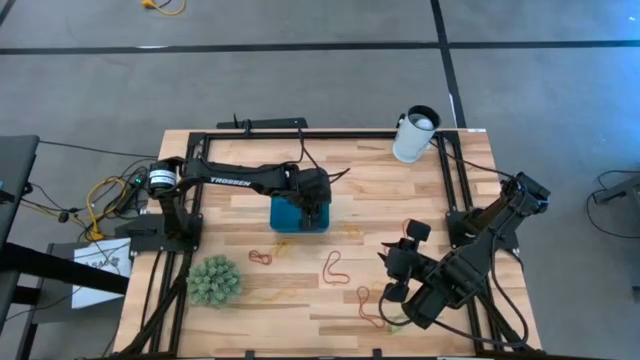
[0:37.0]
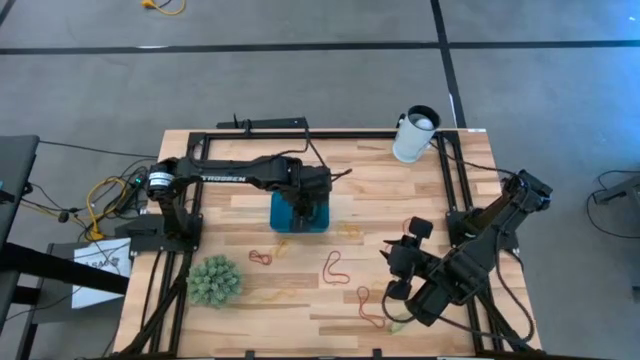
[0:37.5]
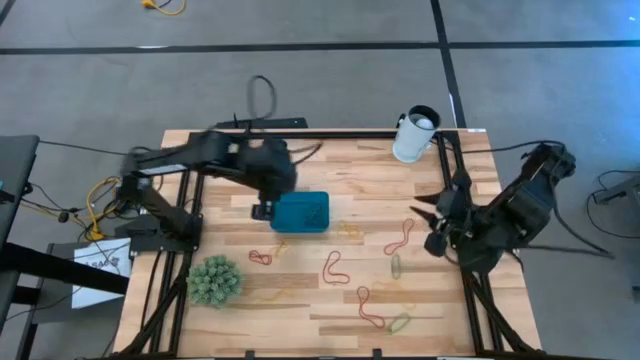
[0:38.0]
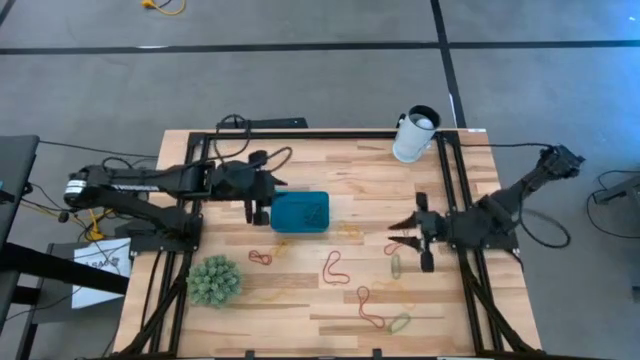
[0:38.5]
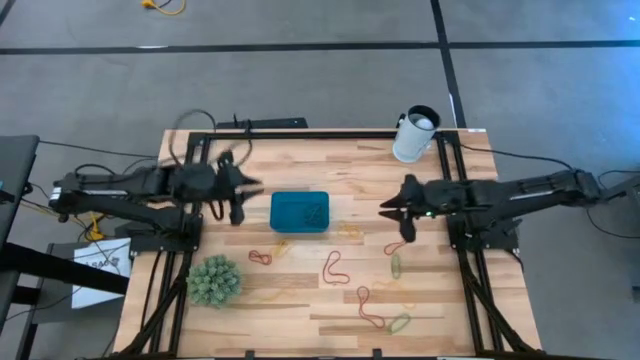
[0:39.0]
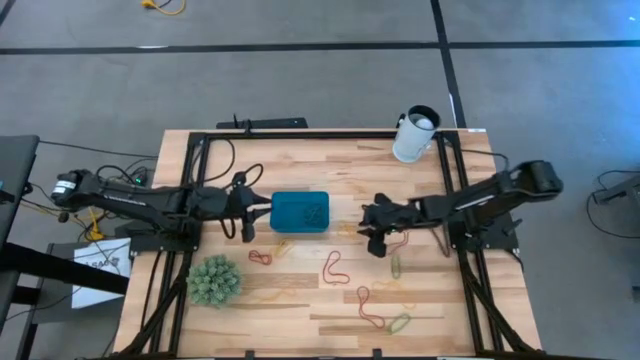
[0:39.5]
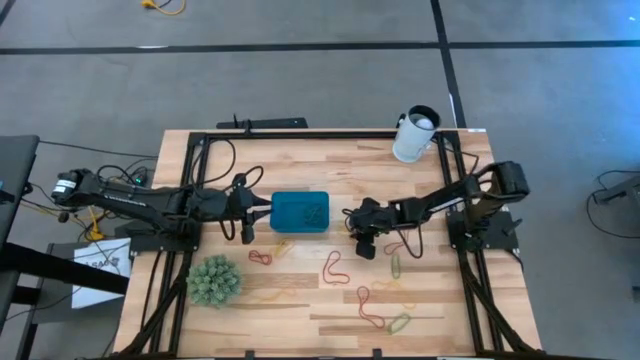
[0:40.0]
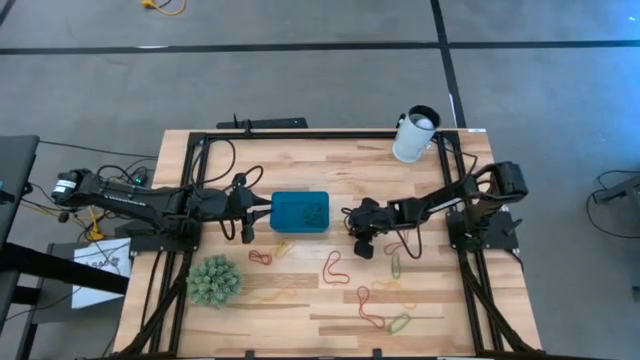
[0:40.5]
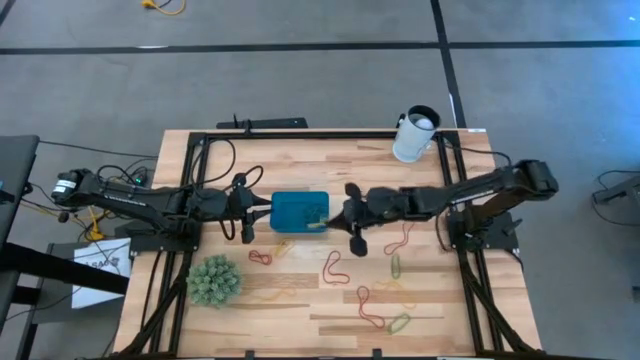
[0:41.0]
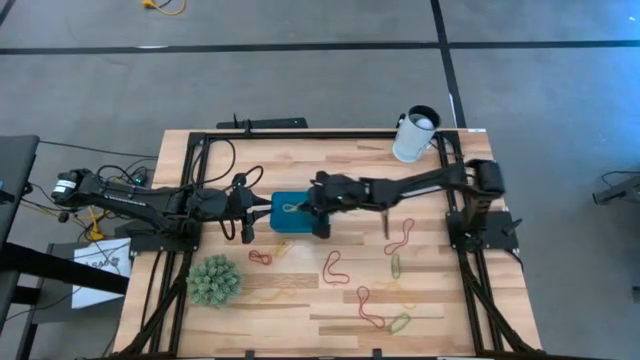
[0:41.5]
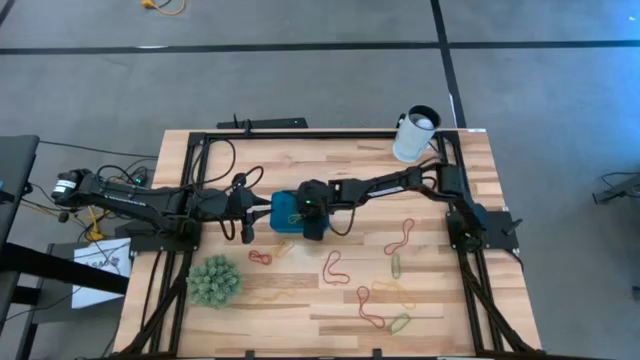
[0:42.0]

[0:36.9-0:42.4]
Task: Pick and place items into bin
Put the yellow rubber band into the blue bin

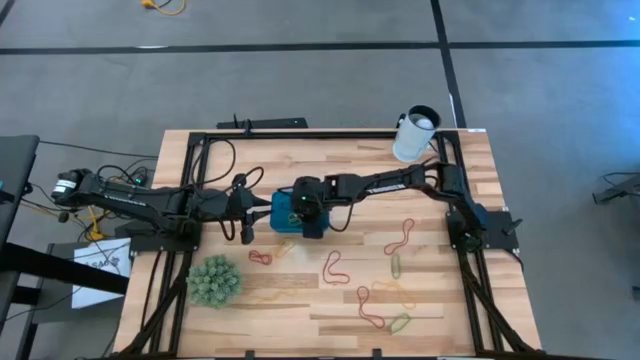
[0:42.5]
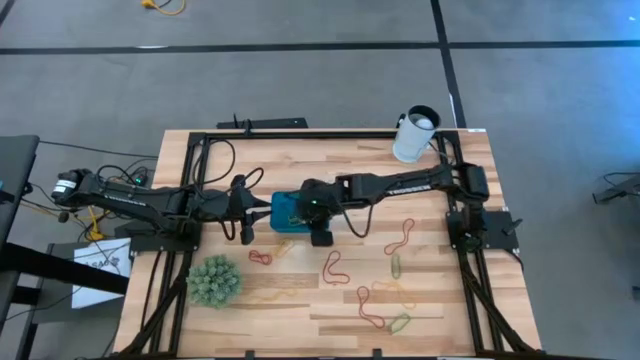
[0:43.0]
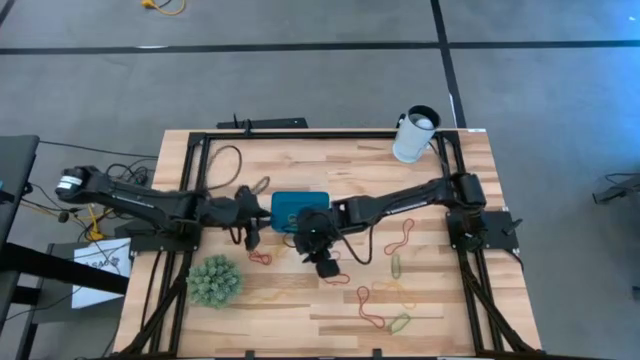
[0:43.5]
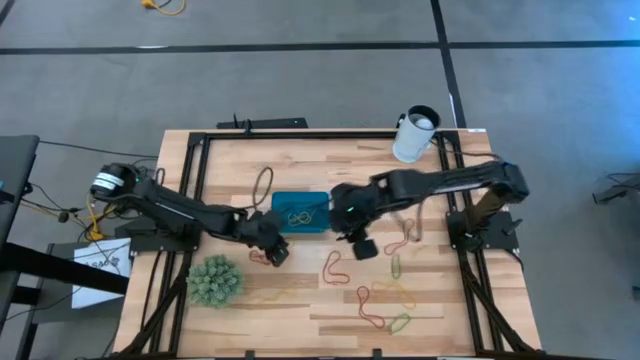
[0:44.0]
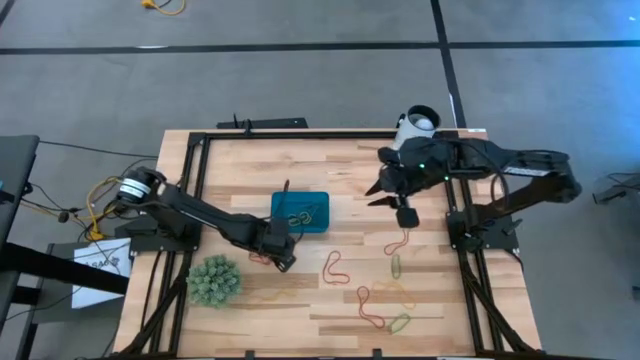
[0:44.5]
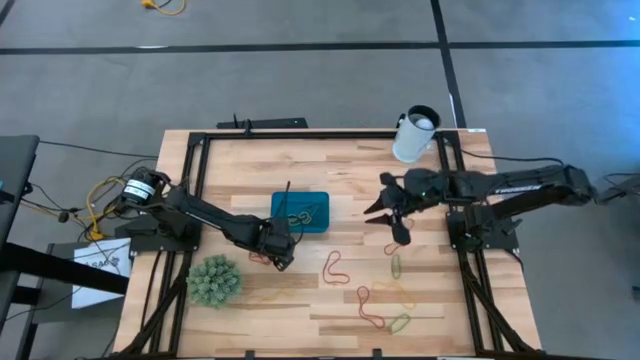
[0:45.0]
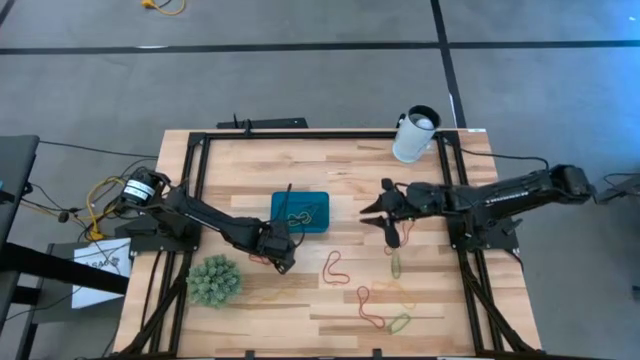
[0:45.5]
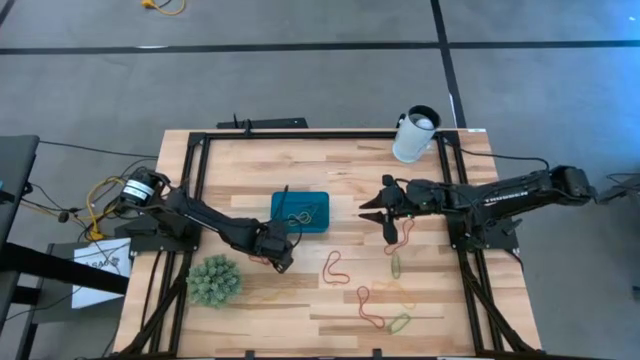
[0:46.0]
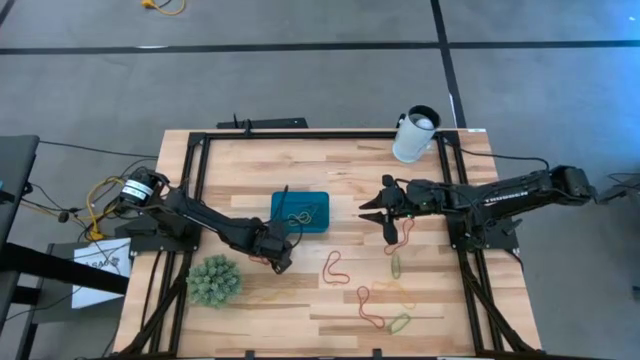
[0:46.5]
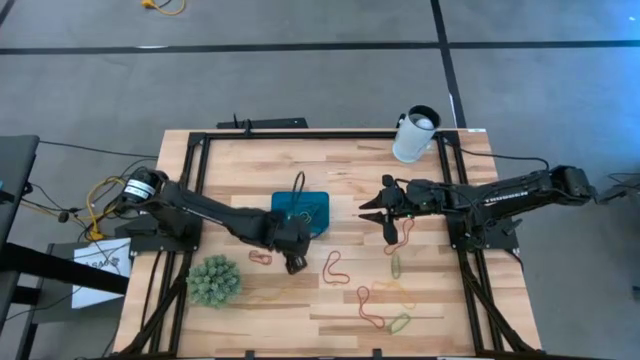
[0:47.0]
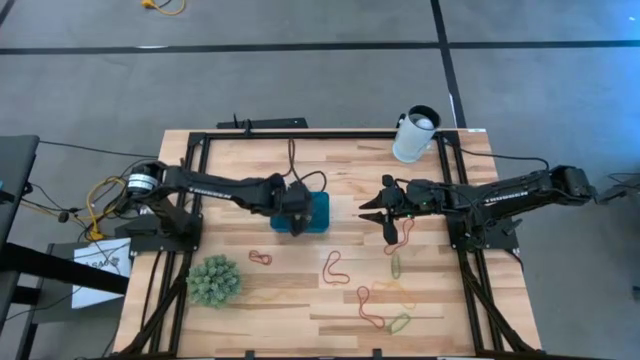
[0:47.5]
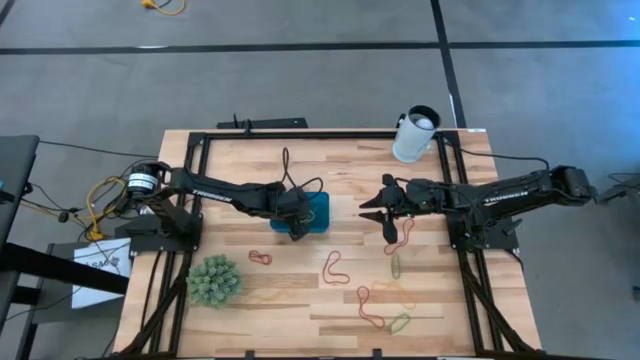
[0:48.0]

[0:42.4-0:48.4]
Put the yellow rubber band into the blue bin

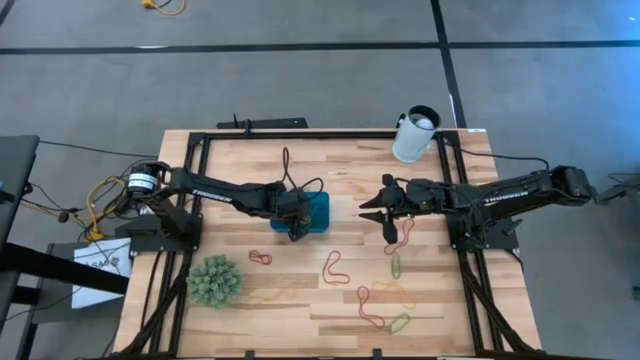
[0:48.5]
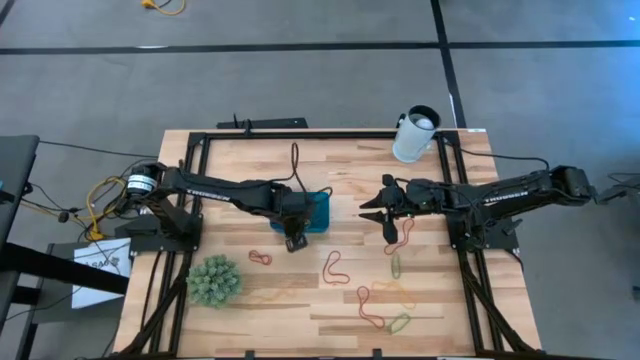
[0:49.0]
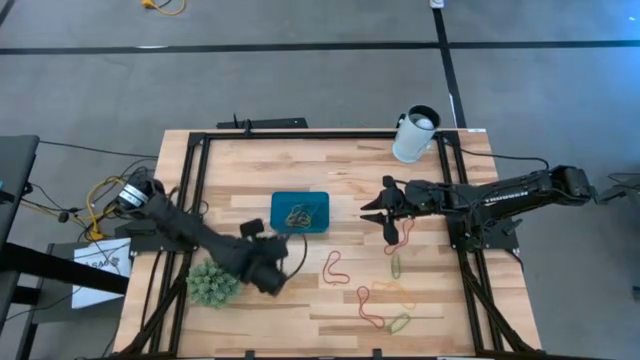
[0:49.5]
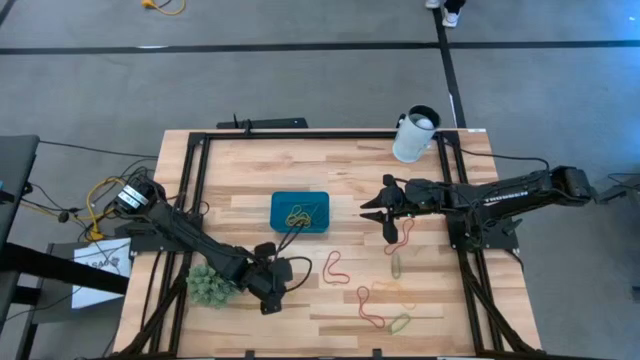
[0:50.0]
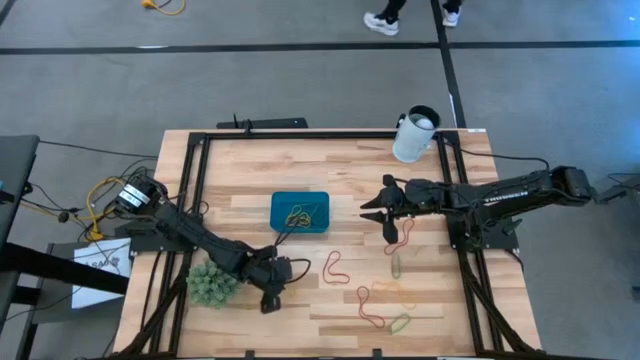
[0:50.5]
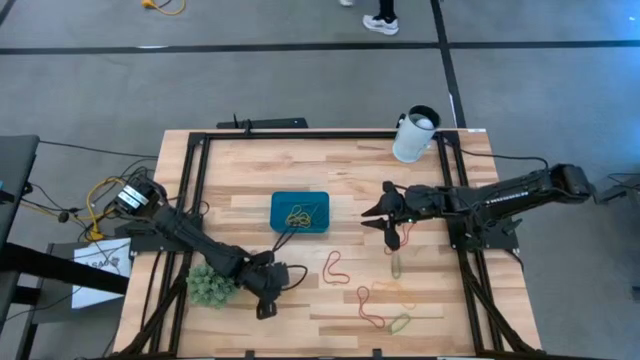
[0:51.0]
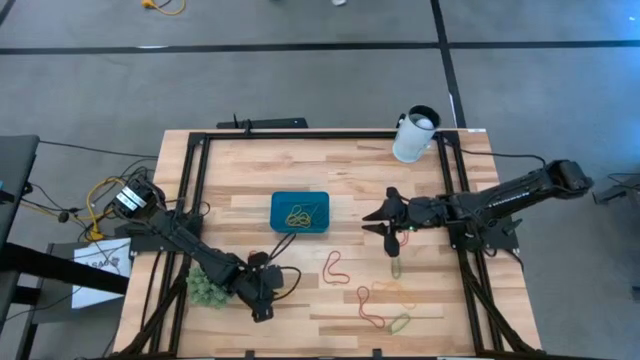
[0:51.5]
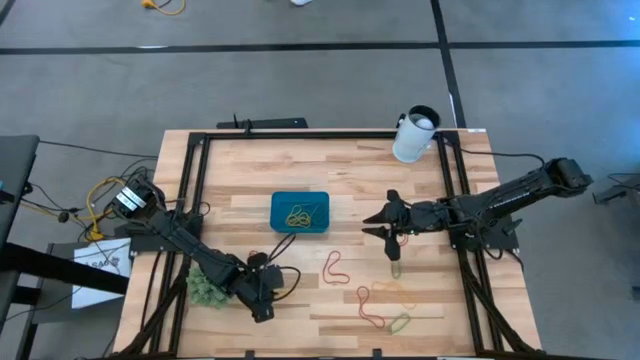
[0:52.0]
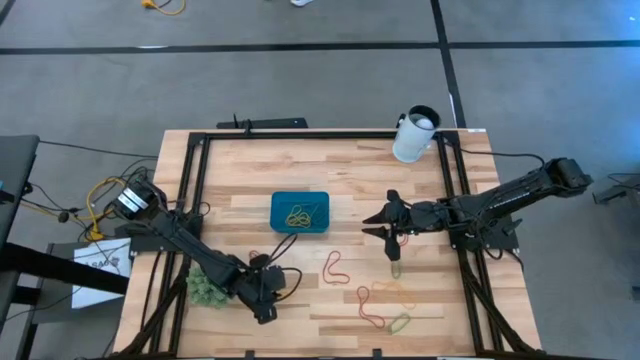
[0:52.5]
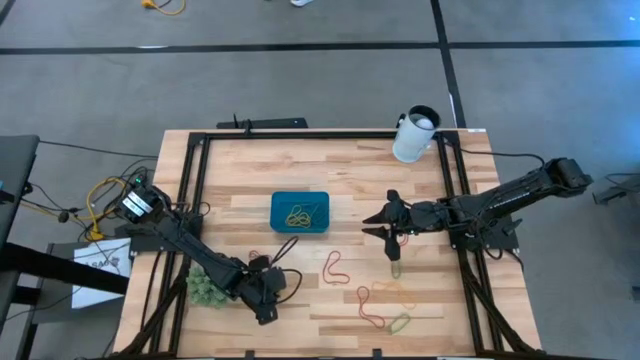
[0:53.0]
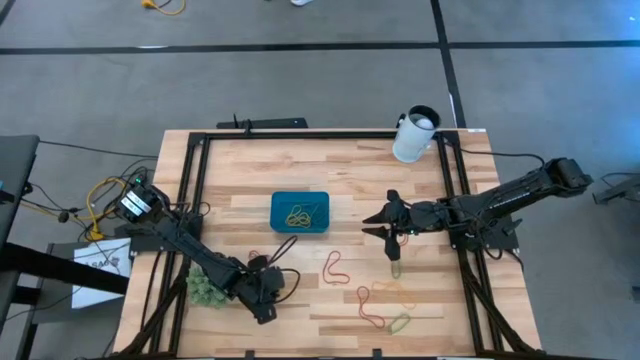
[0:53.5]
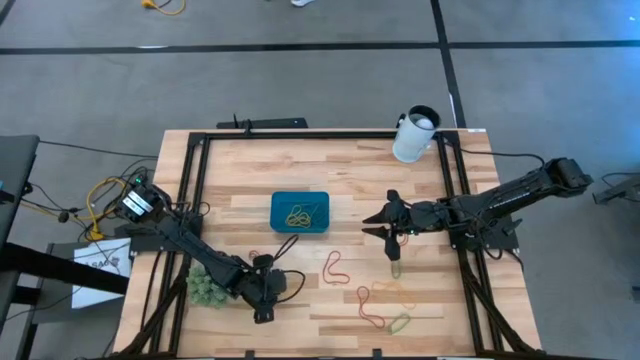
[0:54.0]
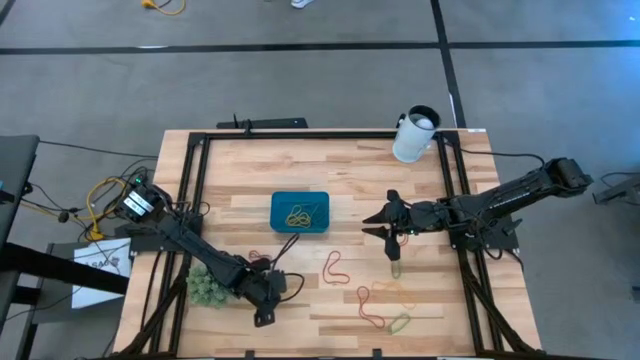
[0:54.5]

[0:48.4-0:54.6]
Put the yellow rubber band into the blue bin

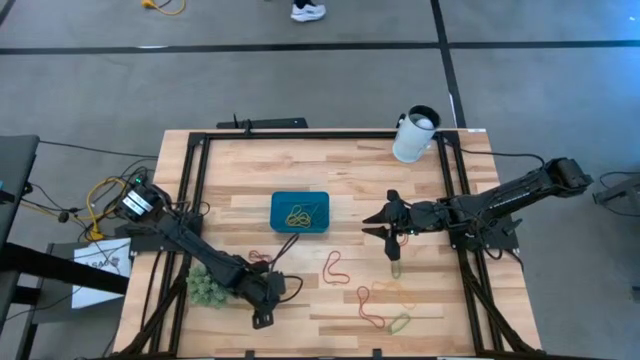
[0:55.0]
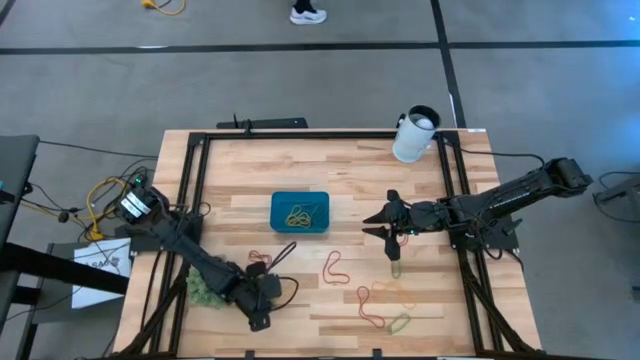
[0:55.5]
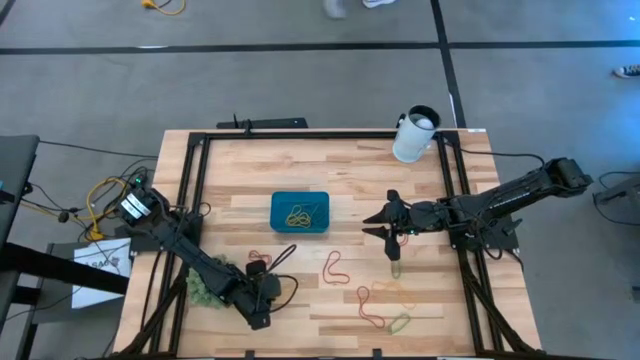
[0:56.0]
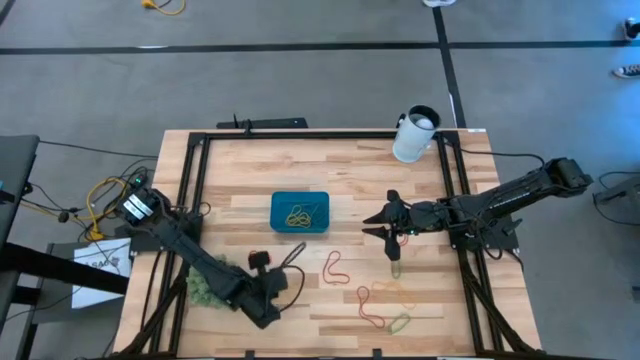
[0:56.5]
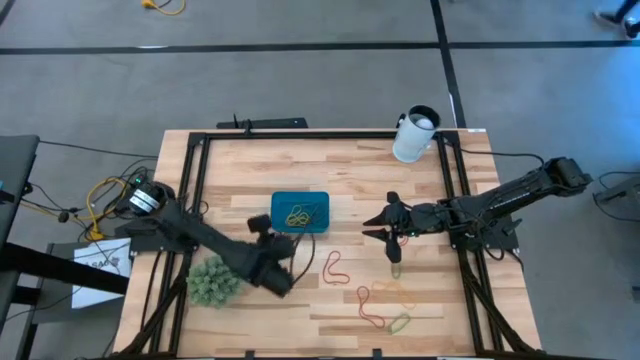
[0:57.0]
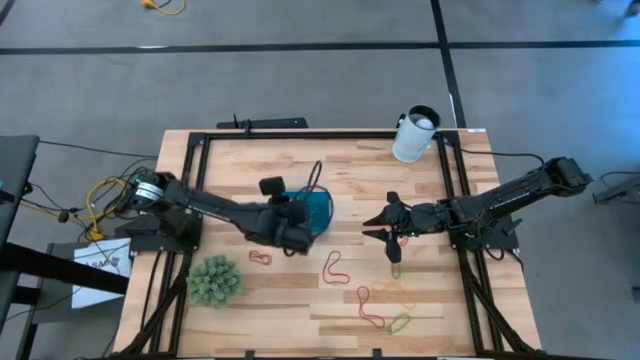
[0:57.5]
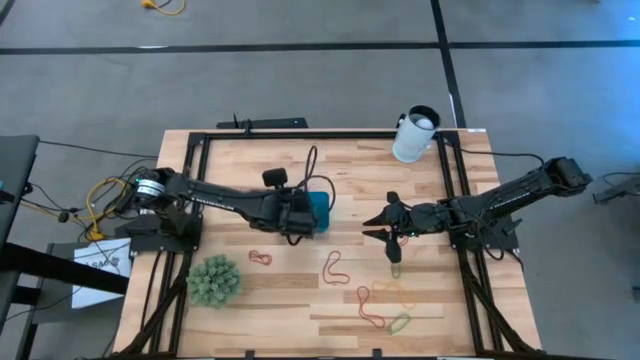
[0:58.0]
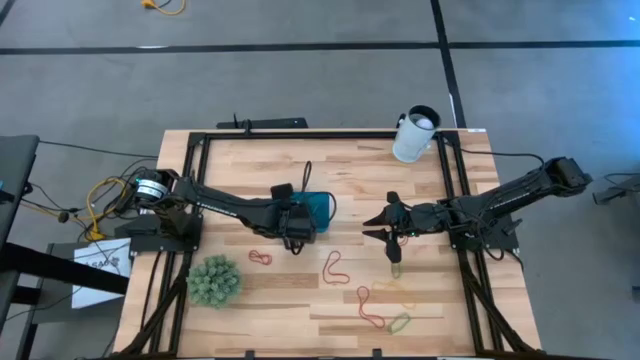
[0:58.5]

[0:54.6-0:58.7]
Put the yellow rubber band into the blue bin
